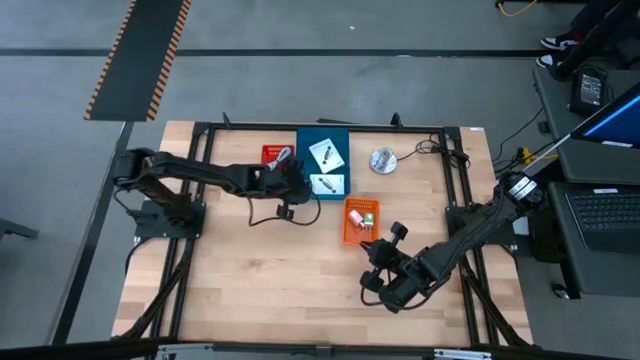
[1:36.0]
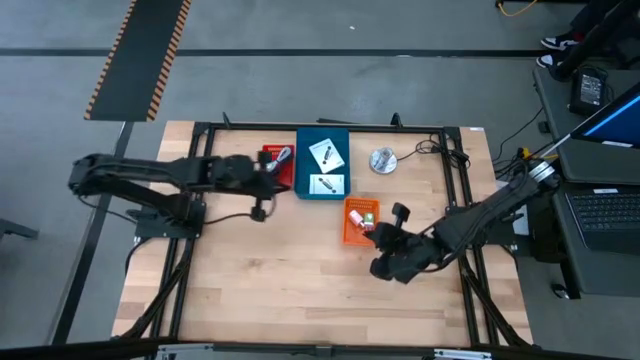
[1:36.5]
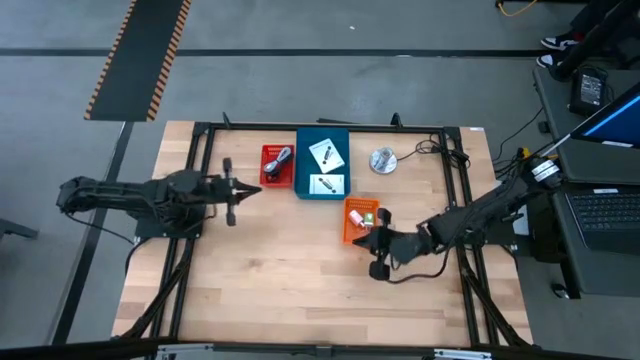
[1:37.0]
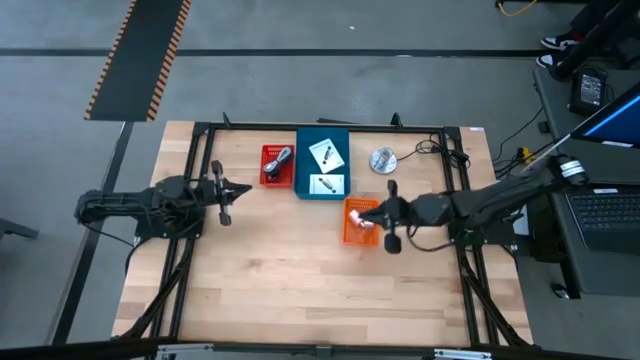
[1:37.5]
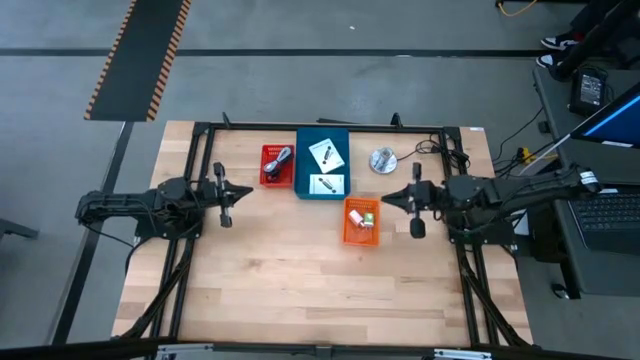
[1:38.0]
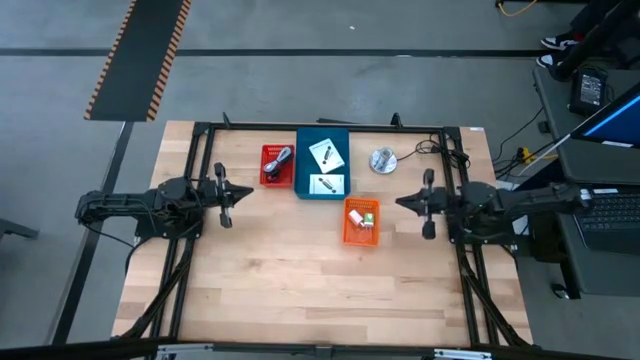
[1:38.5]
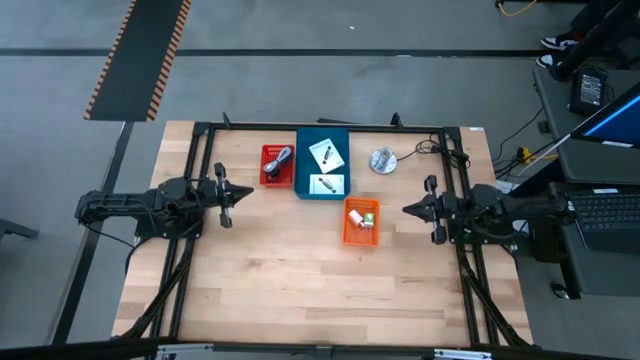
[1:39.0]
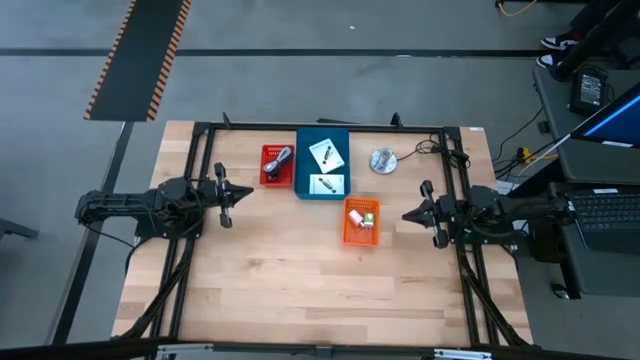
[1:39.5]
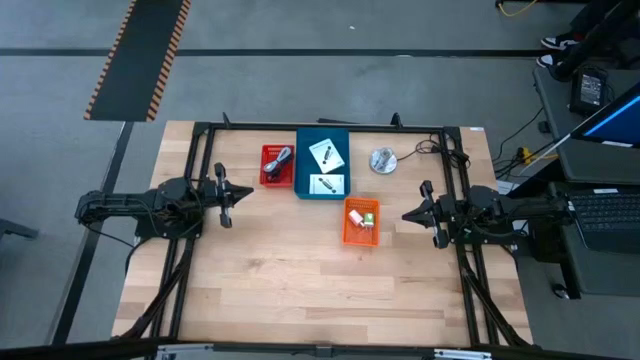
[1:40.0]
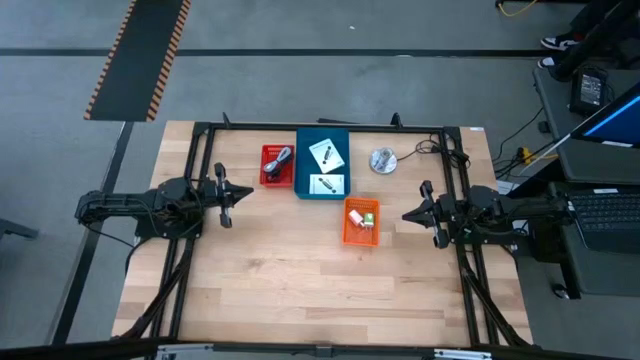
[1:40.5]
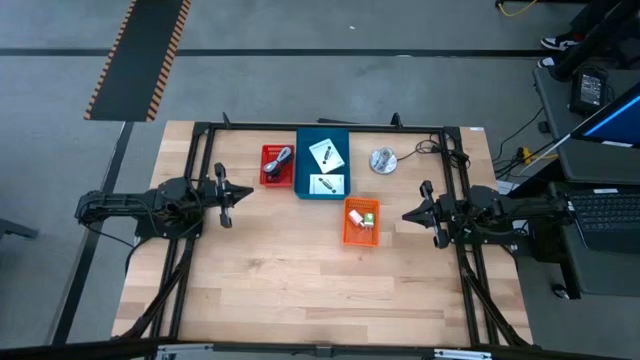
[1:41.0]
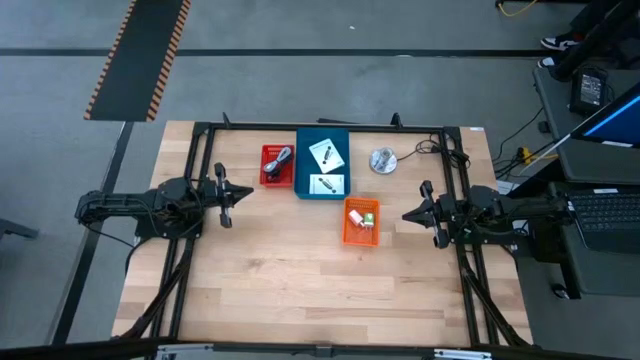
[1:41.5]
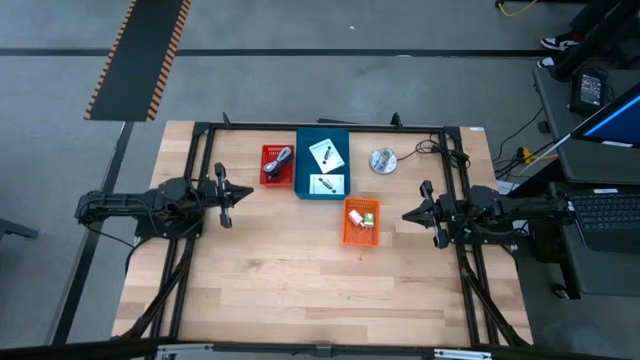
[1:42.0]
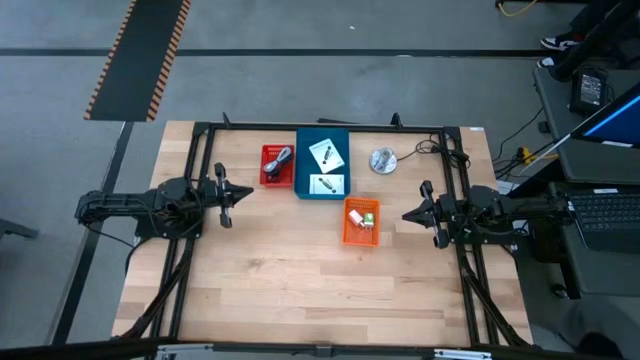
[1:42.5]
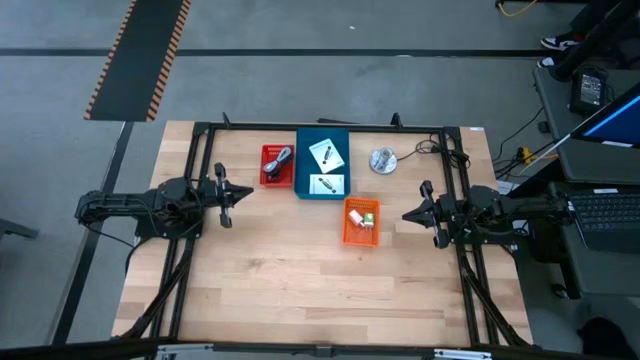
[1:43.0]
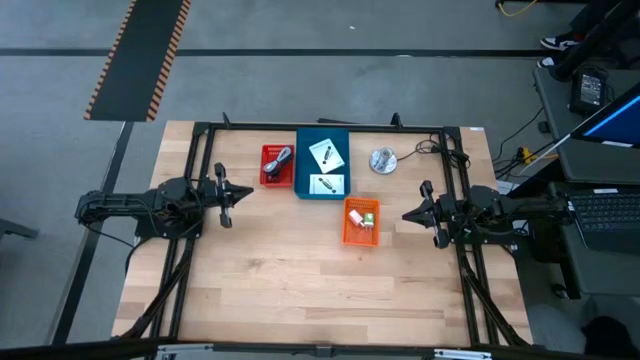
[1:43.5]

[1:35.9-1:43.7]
Task: Pick and place items into bin
Return to Home Position

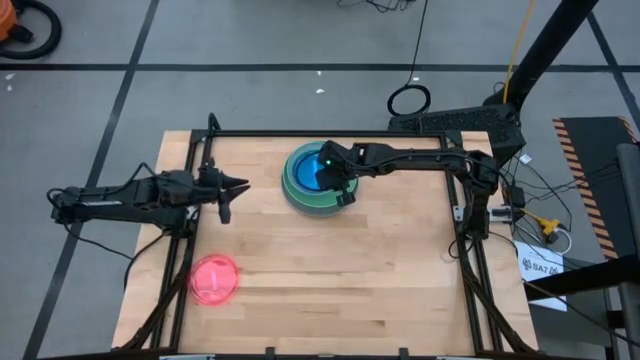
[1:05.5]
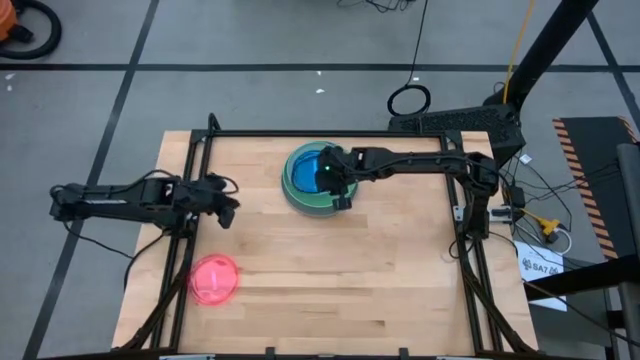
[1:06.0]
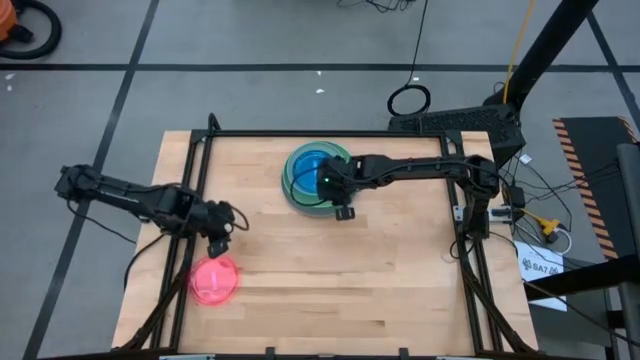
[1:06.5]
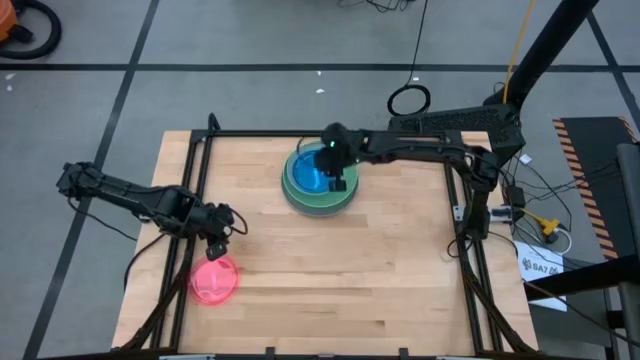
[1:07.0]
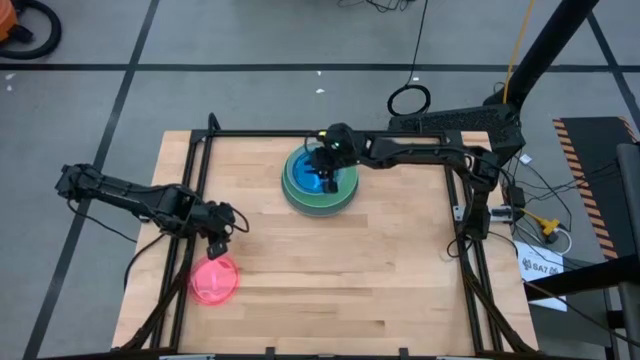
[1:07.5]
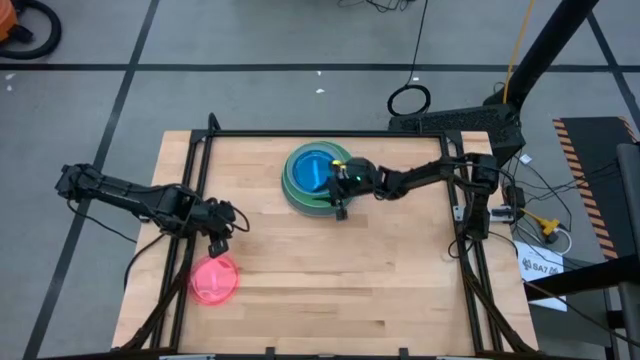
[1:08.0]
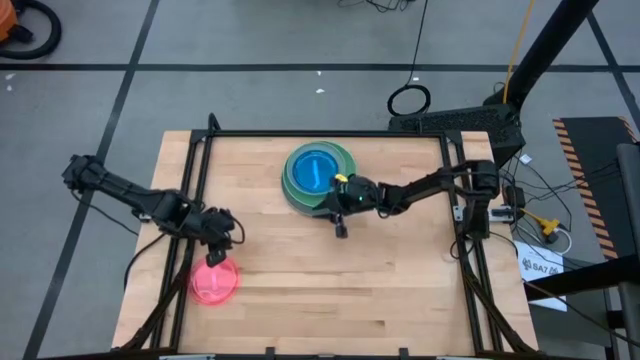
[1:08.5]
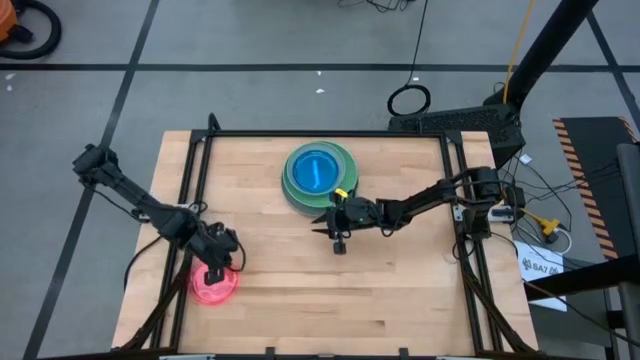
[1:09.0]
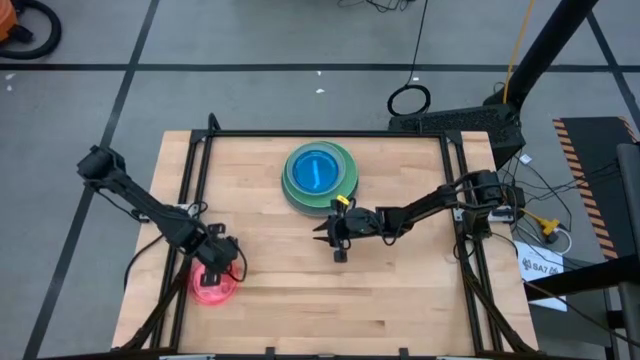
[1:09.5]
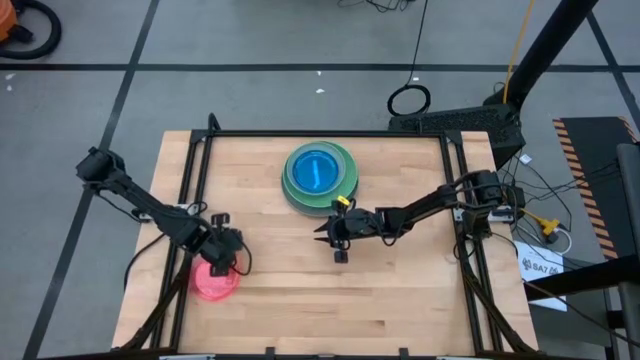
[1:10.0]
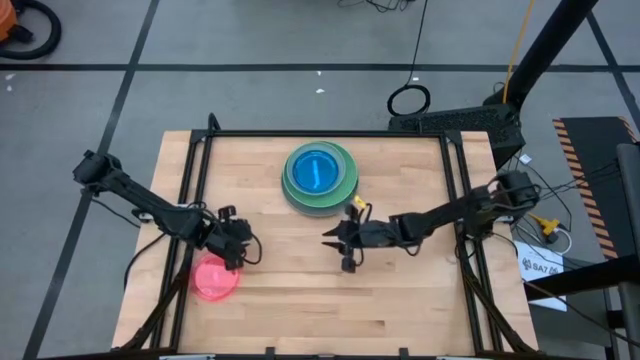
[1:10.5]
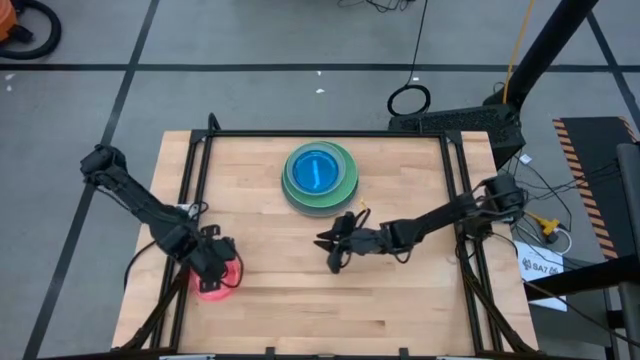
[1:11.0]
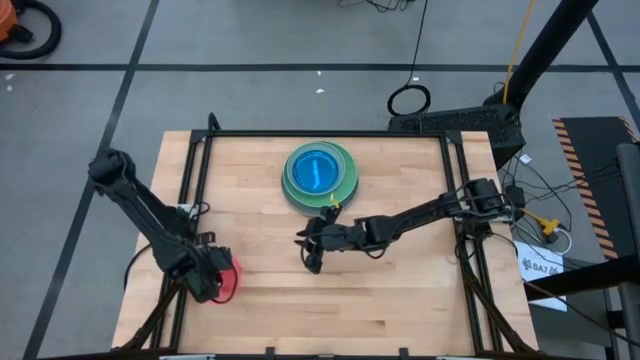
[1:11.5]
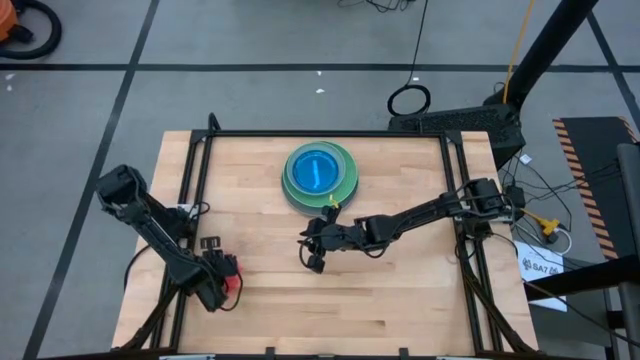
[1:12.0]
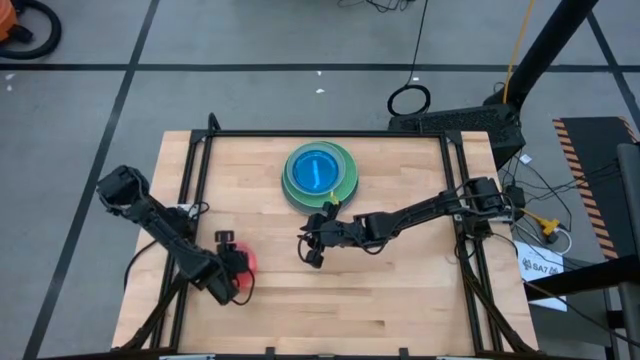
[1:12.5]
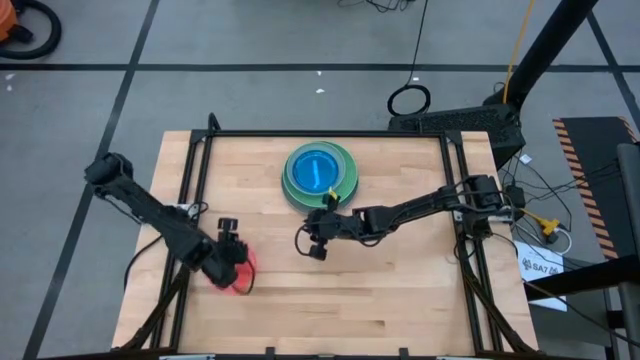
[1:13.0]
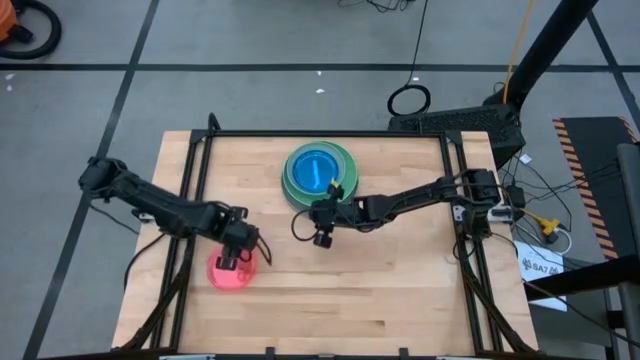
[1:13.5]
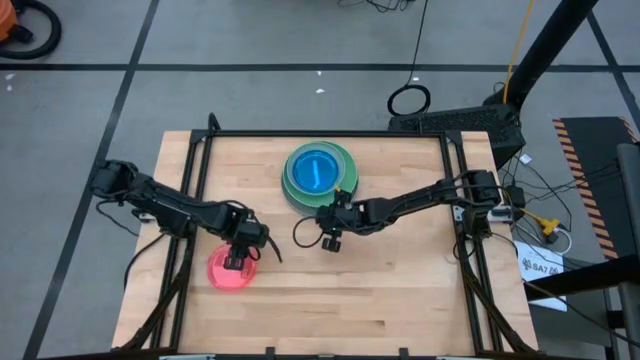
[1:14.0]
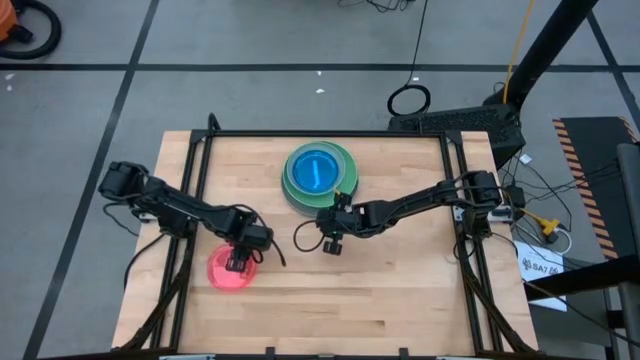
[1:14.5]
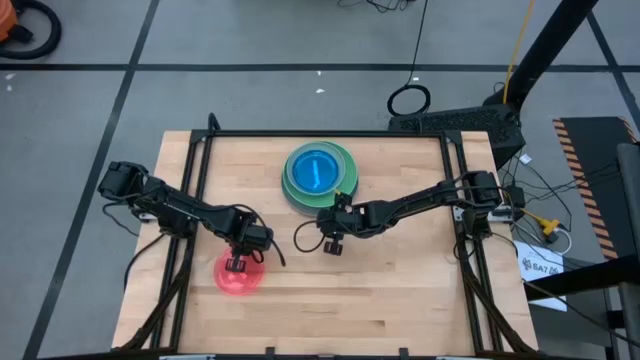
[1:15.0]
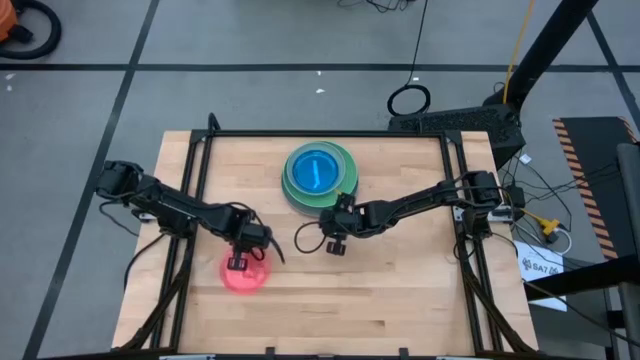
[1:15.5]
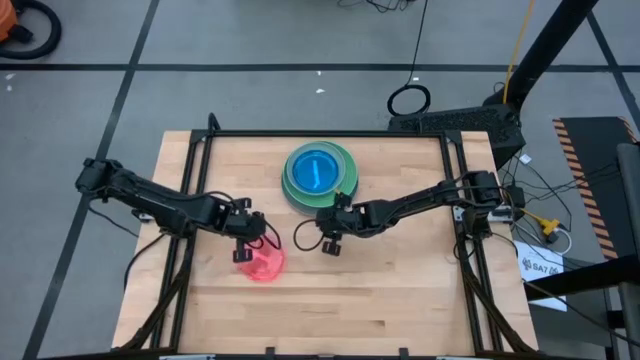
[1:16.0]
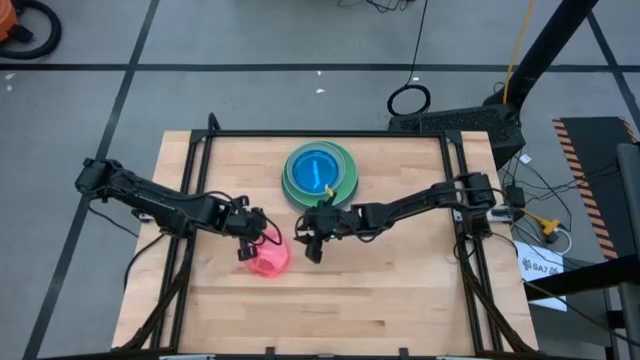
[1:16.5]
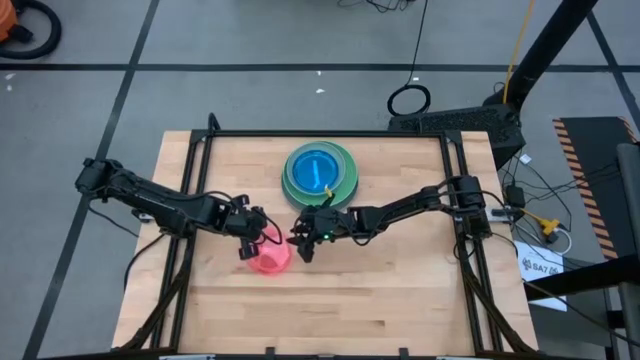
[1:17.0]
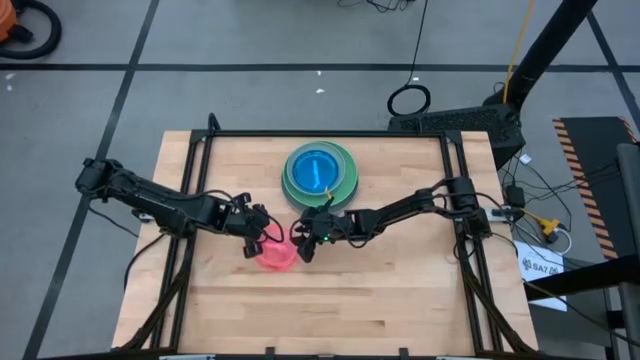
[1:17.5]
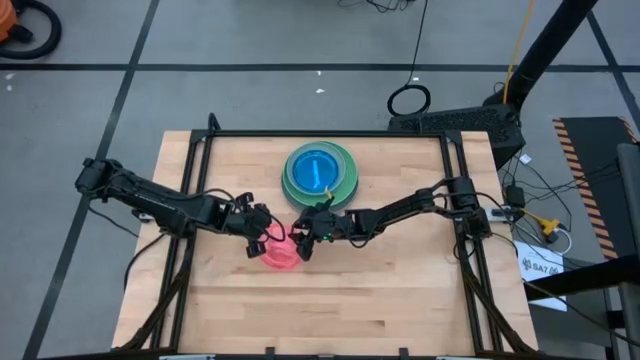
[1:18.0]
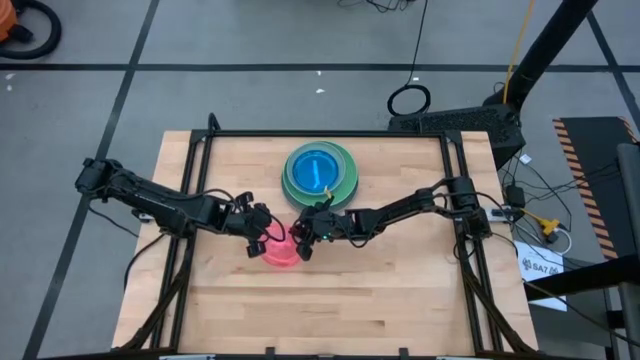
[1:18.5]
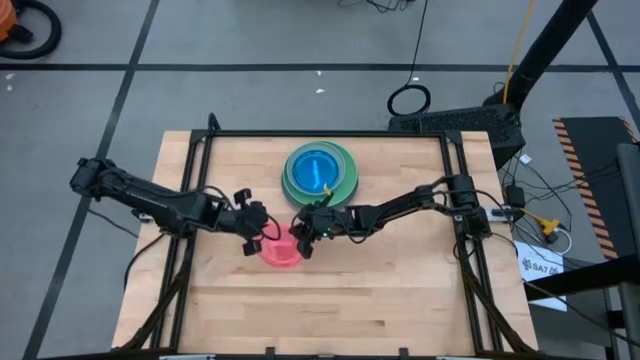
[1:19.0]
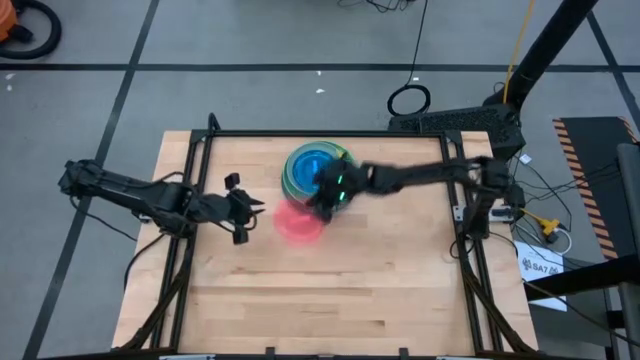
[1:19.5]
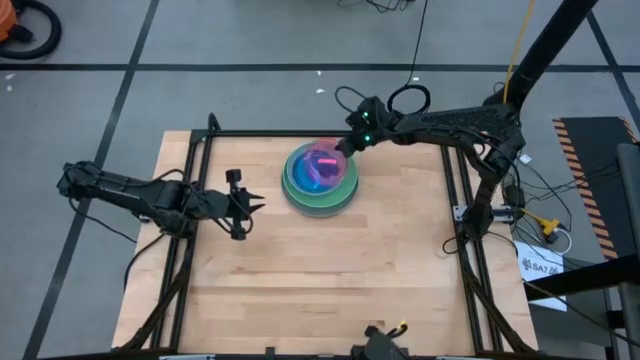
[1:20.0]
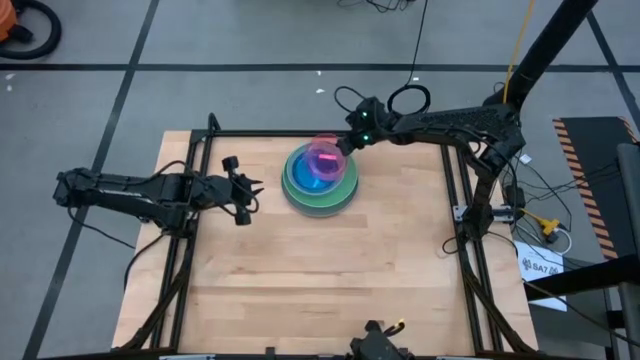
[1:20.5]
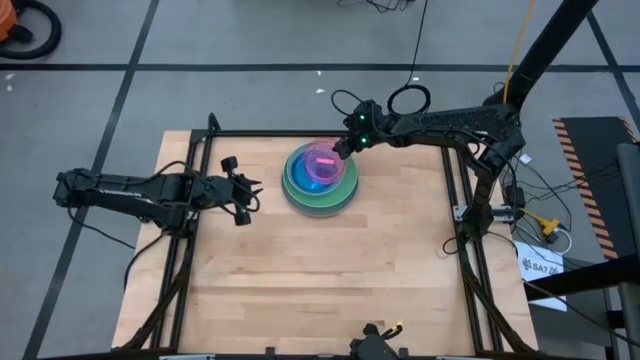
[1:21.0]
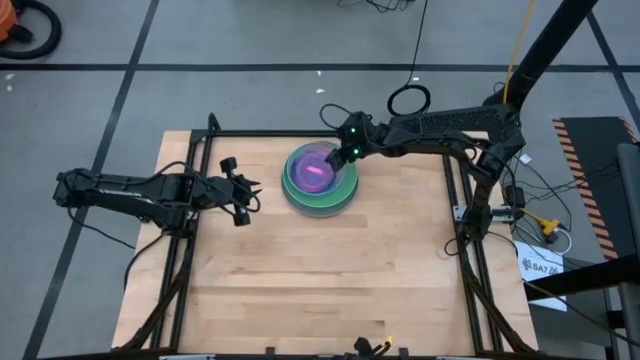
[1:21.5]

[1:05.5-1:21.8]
Task: Stack plastic plates
Stack the pink plate on the blue plate
